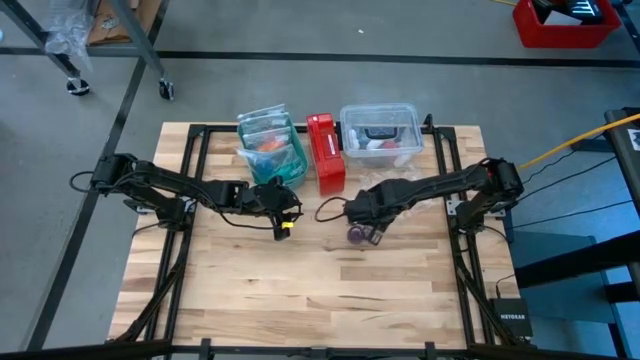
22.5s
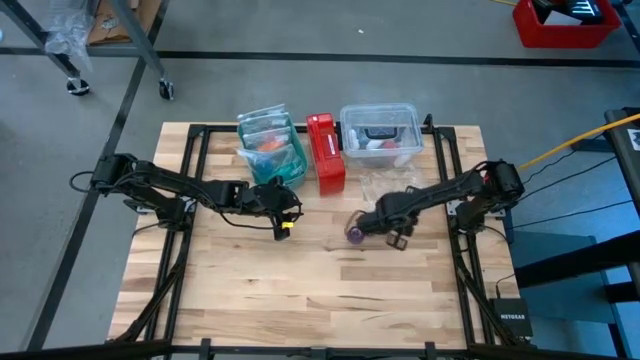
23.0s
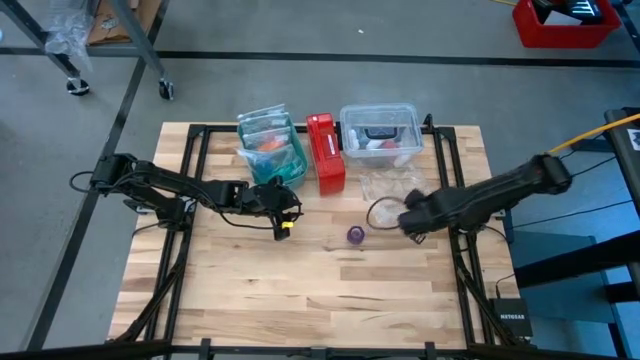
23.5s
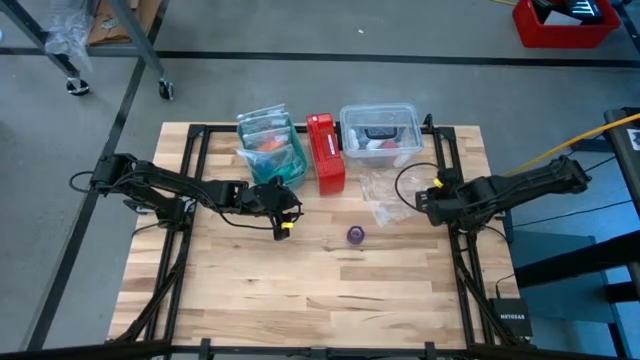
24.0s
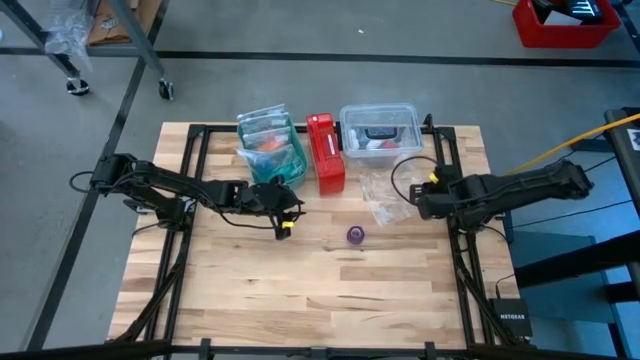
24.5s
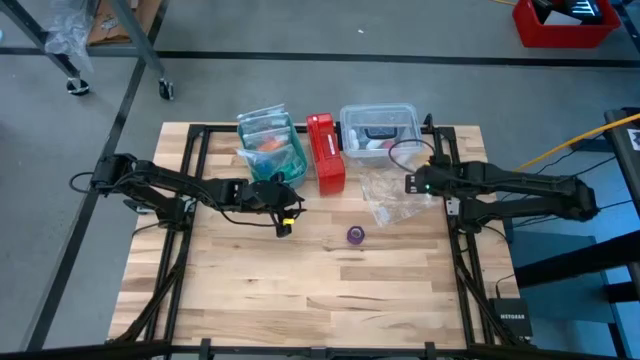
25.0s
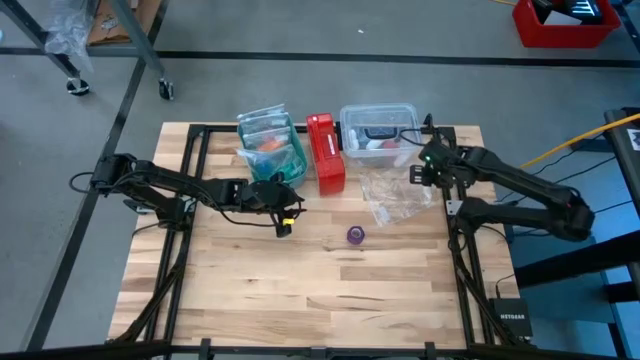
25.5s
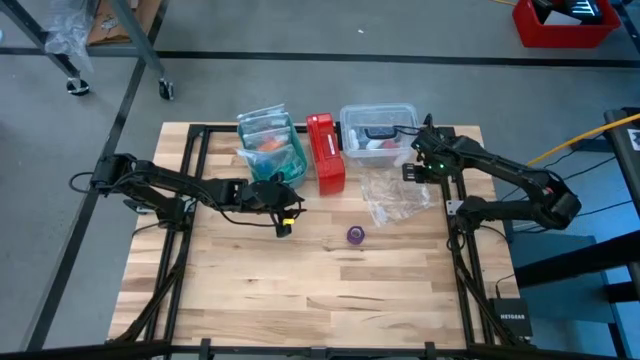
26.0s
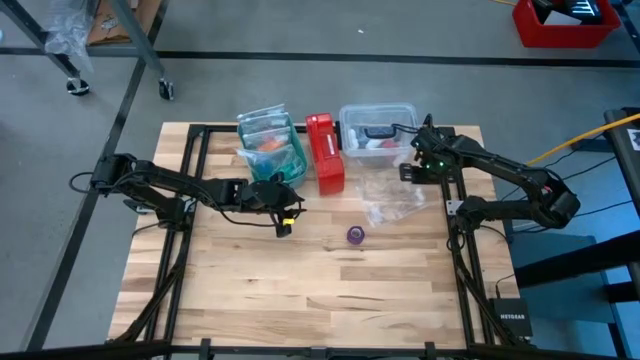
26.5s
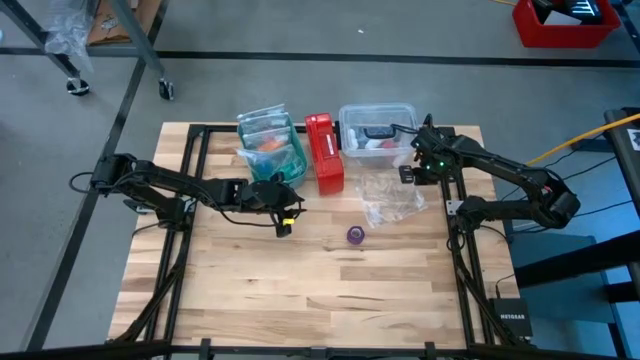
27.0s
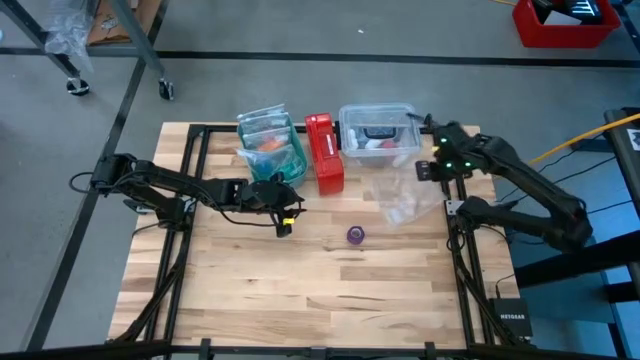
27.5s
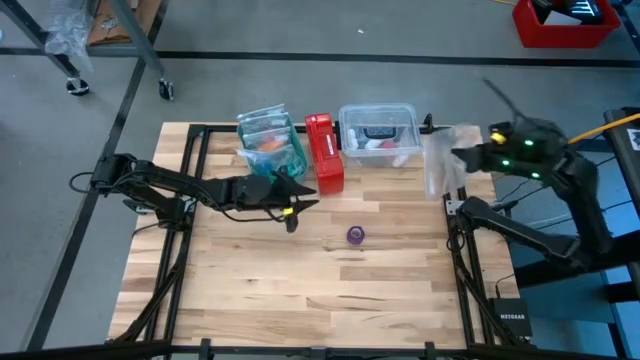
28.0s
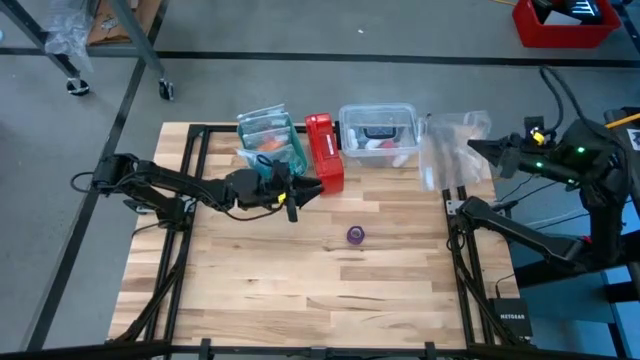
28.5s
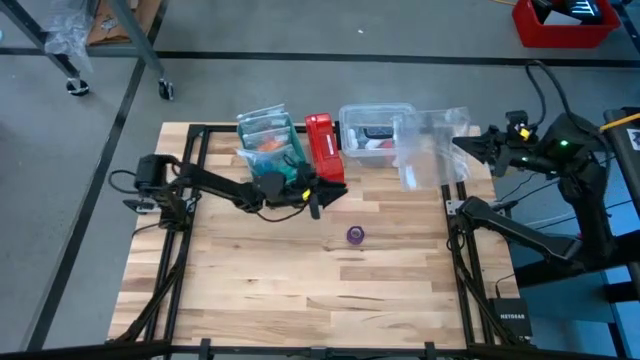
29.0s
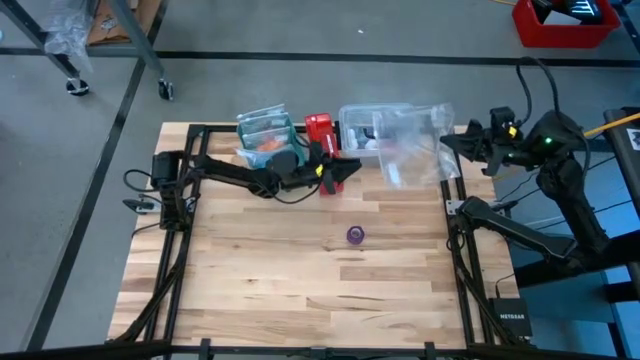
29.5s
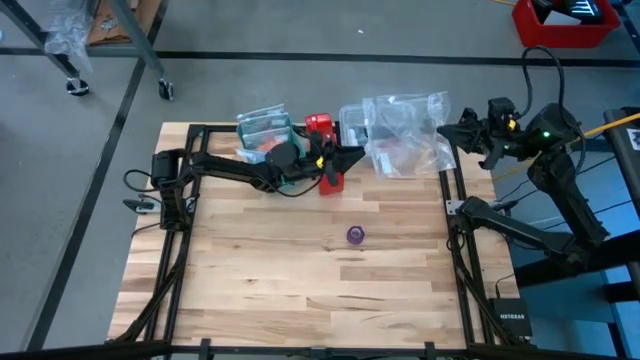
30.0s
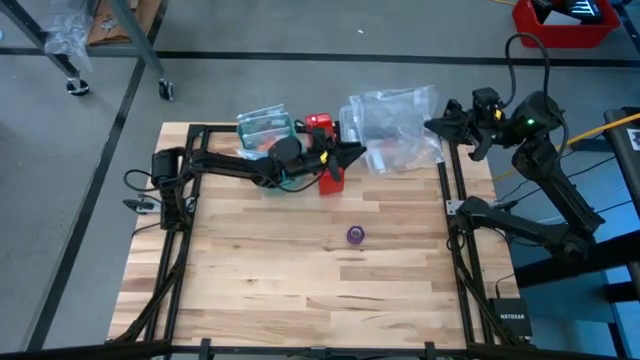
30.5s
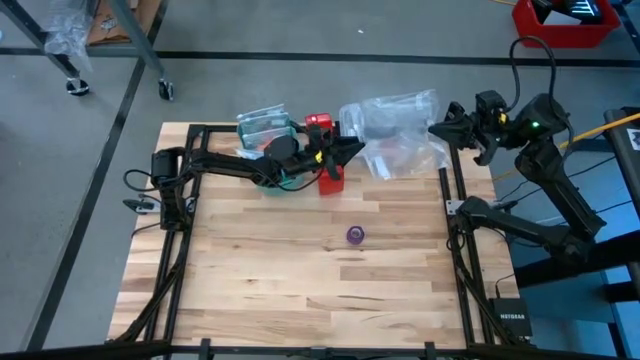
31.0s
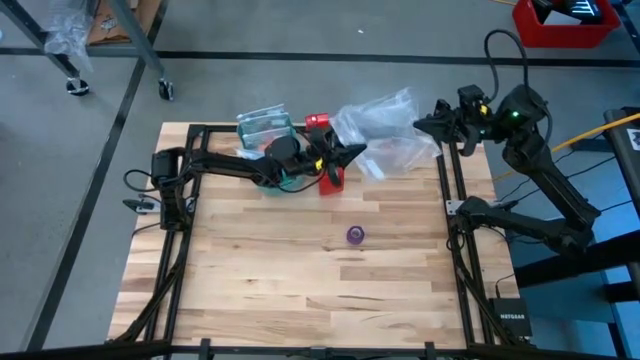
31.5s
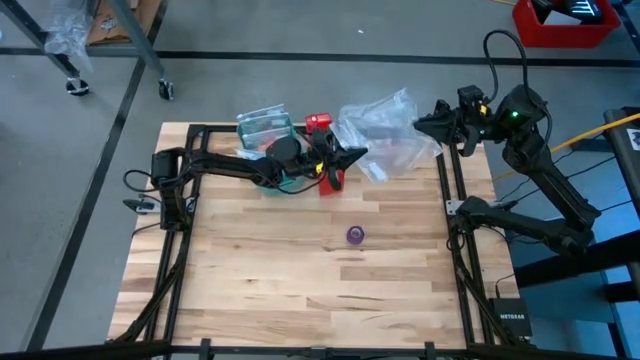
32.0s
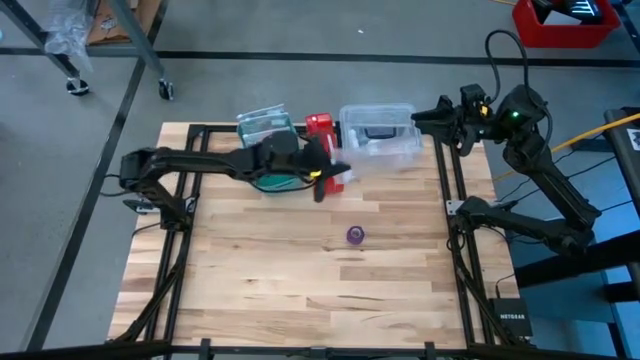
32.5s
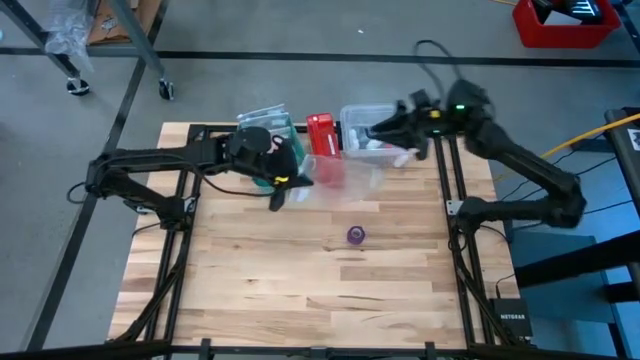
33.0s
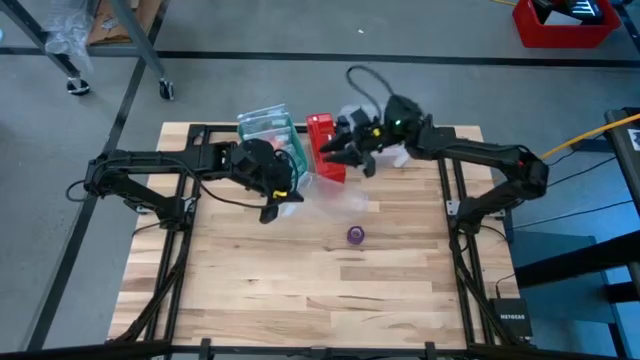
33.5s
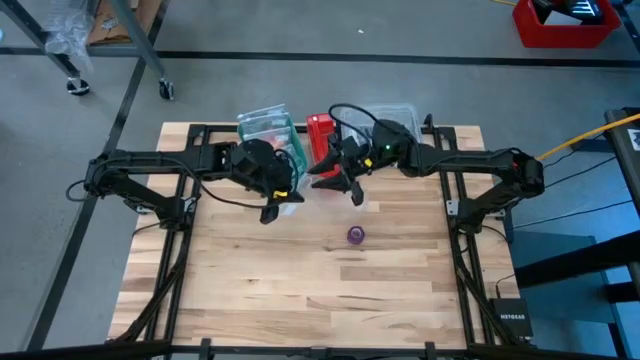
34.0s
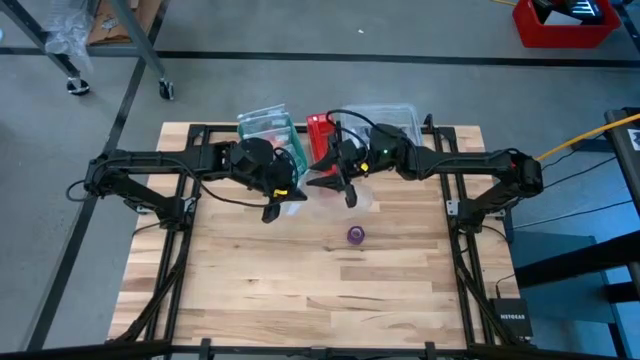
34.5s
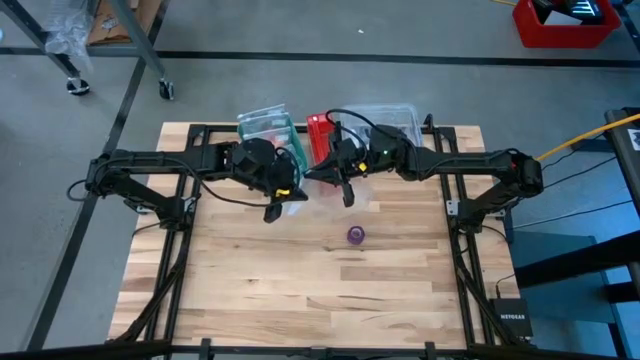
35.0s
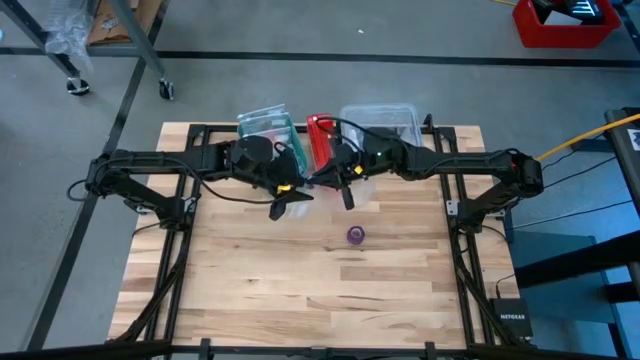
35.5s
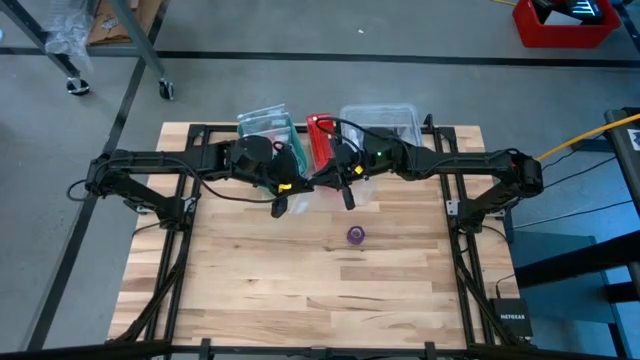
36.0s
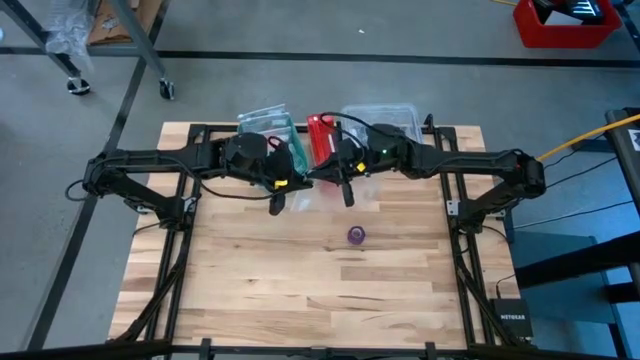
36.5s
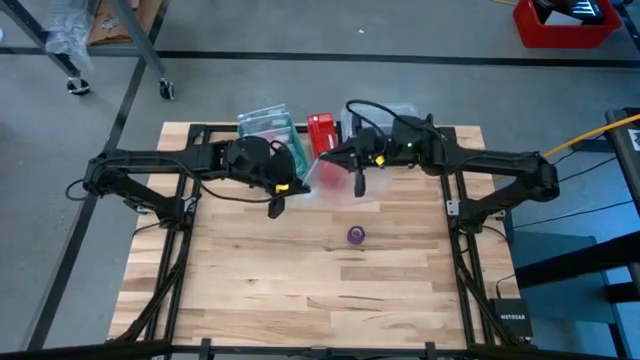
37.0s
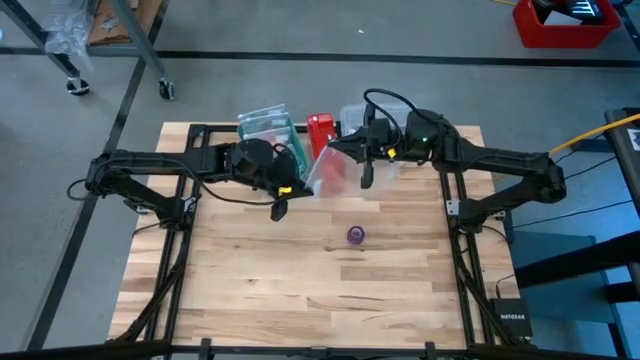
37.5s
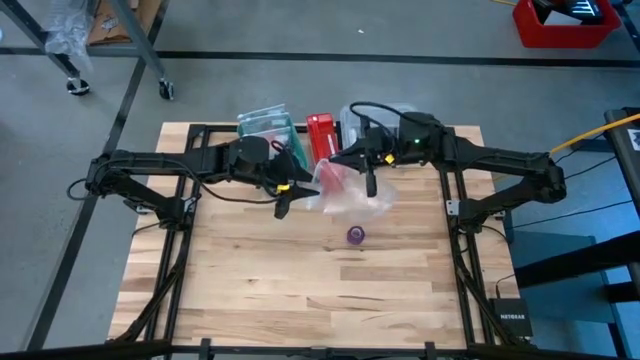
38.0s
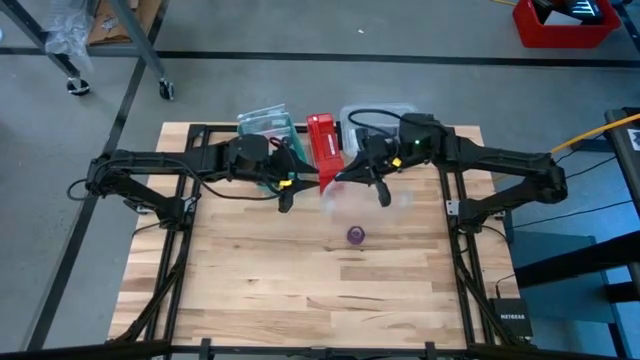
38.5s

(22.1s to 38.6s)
Task: Roll bandage
Open the transparent zip bag

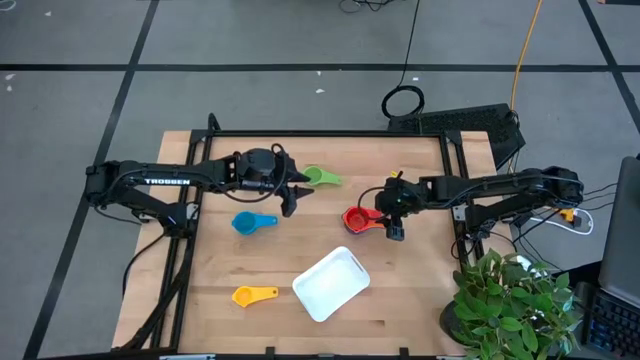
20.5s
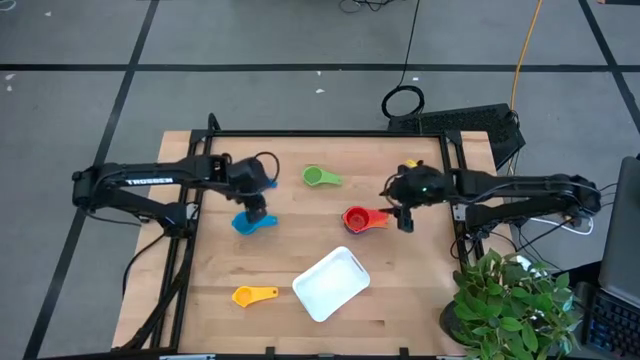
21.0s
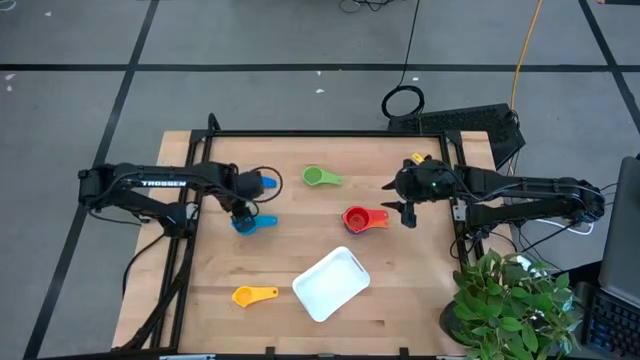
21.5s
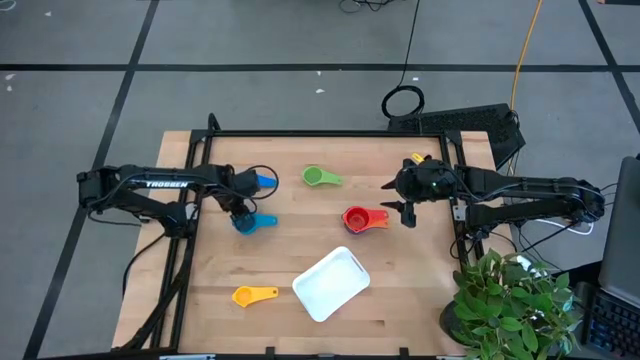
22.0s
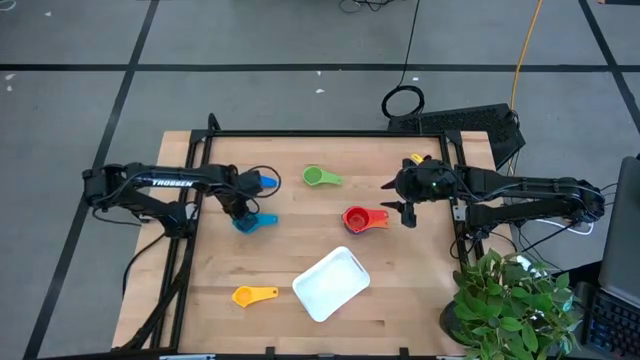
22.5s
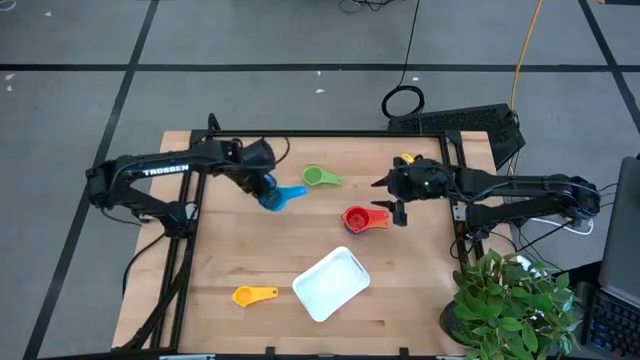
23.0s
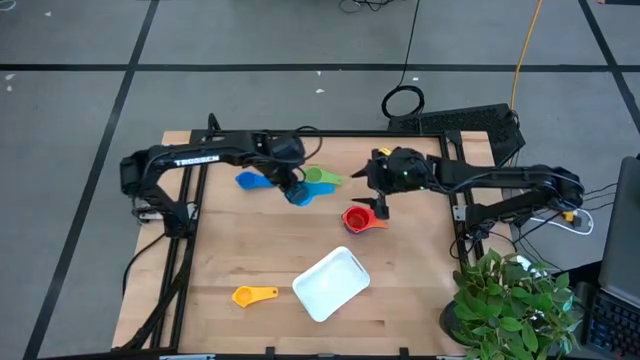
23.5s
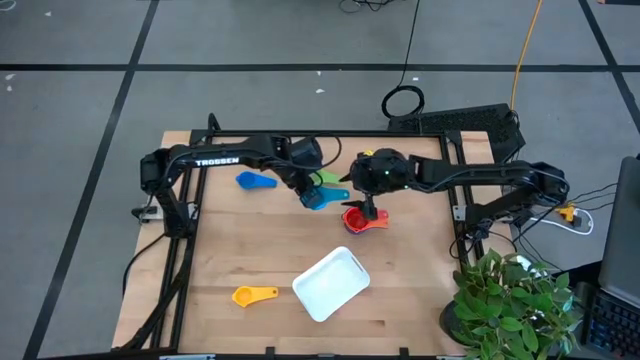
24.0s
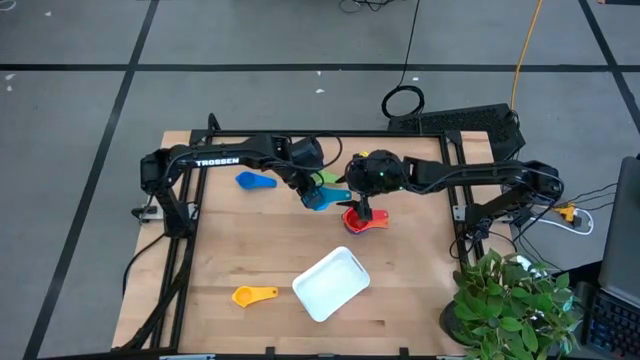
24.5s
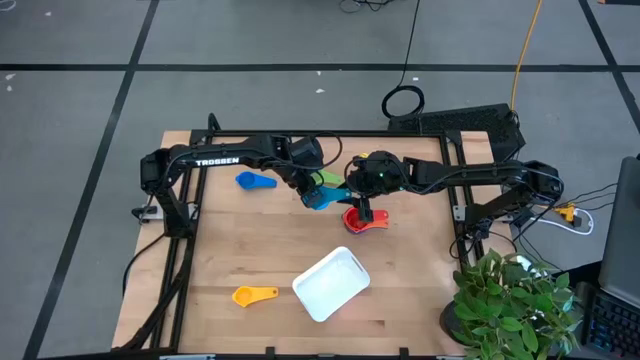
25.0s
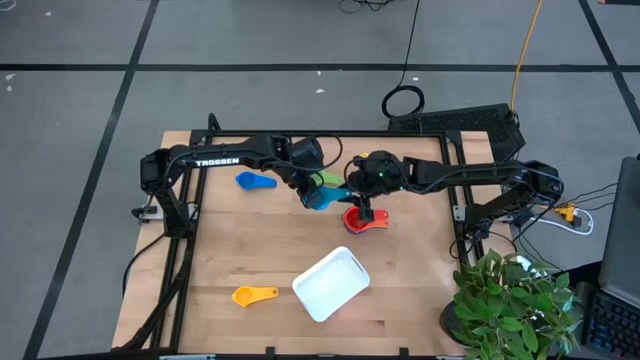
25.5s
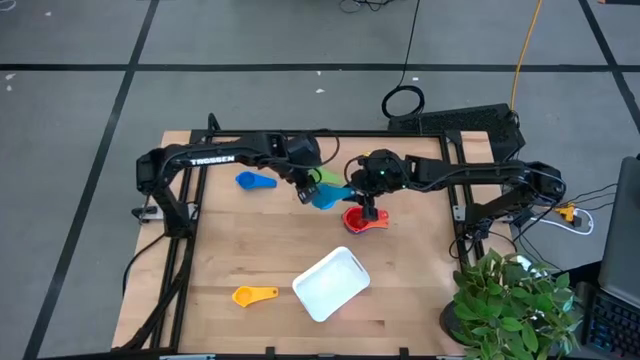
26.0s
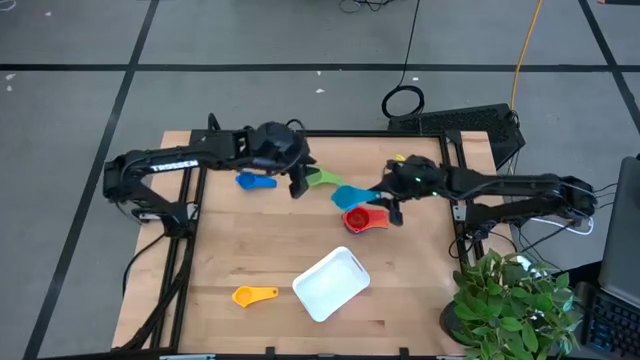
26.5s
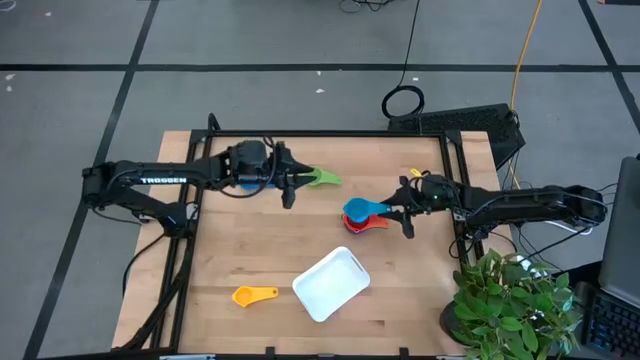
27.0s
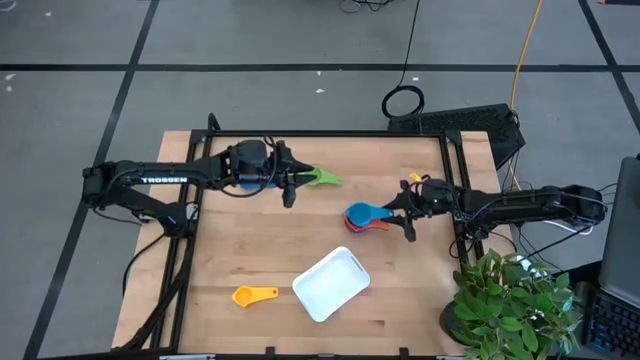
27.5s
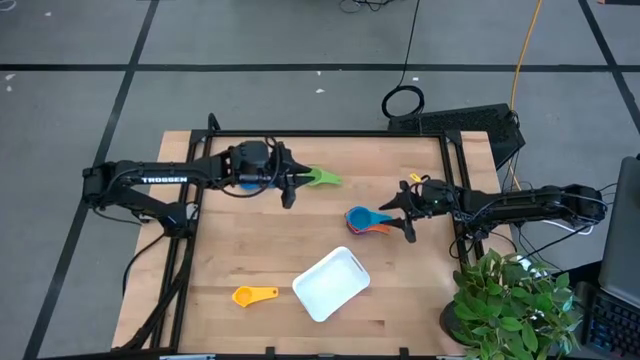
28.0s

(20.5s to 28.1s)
Task: Nest measuring cups in basket
Stack the light blue measuring cup on top of the red measuring cup
